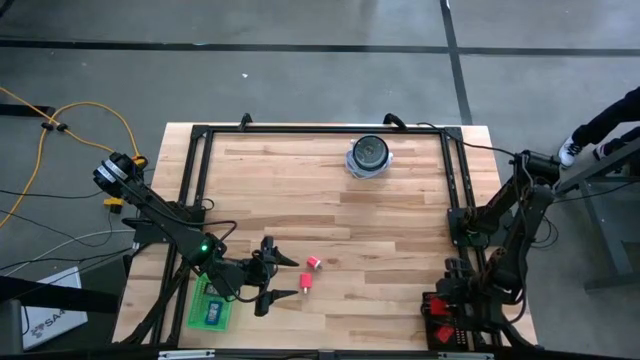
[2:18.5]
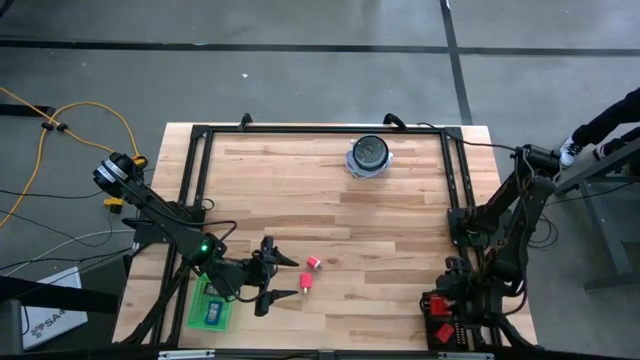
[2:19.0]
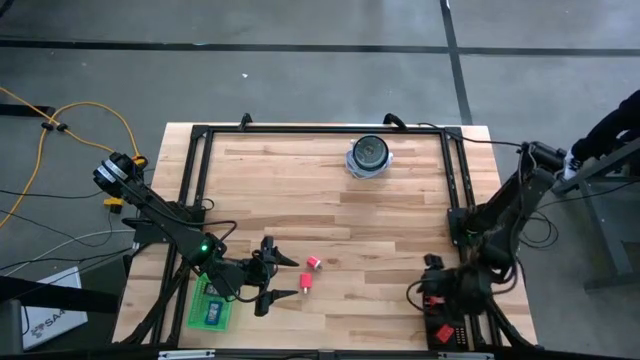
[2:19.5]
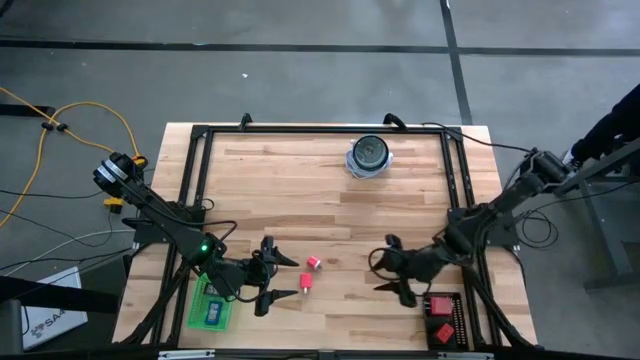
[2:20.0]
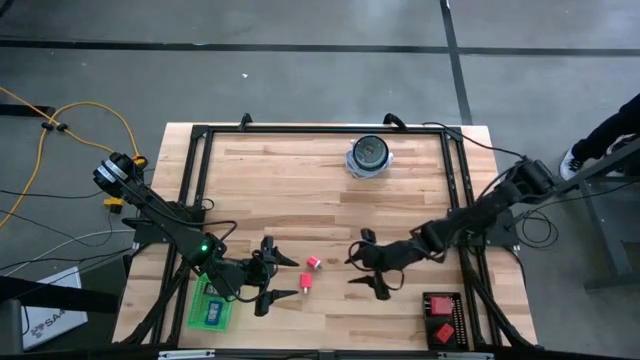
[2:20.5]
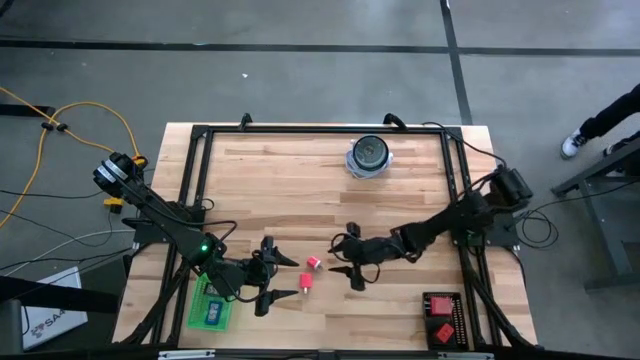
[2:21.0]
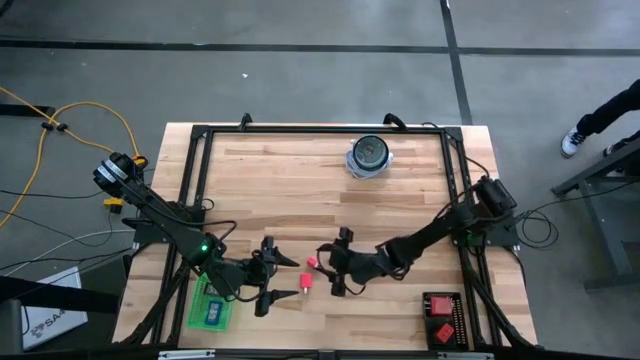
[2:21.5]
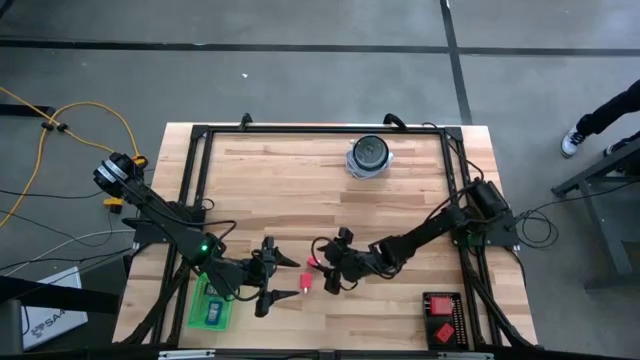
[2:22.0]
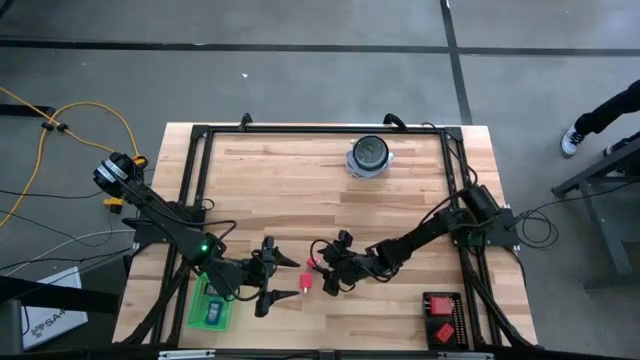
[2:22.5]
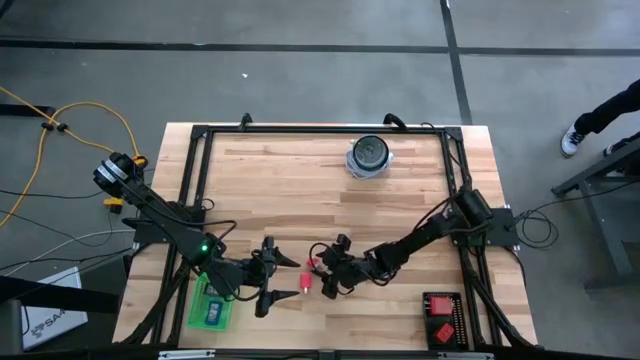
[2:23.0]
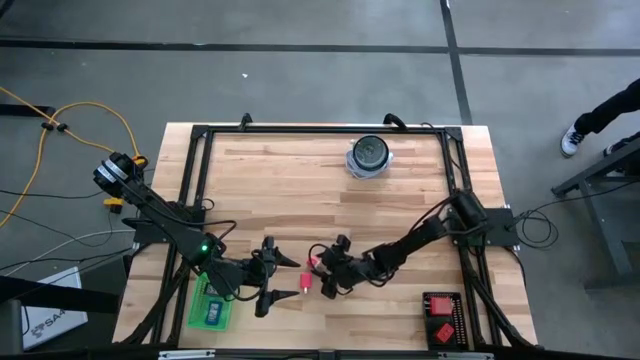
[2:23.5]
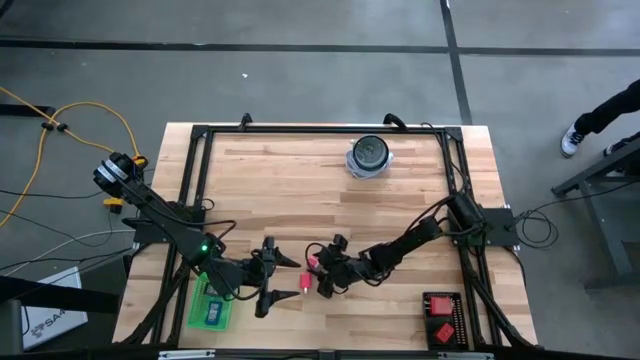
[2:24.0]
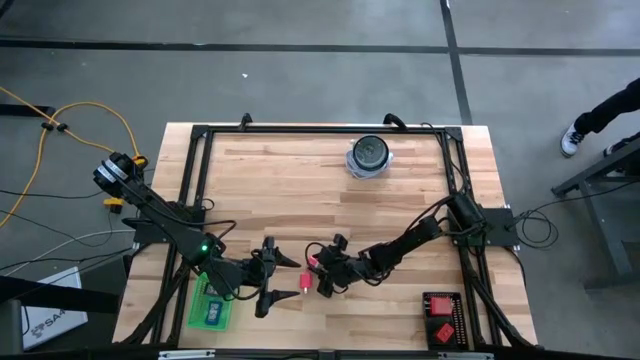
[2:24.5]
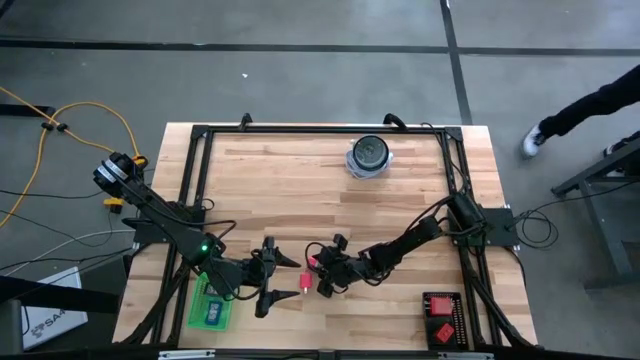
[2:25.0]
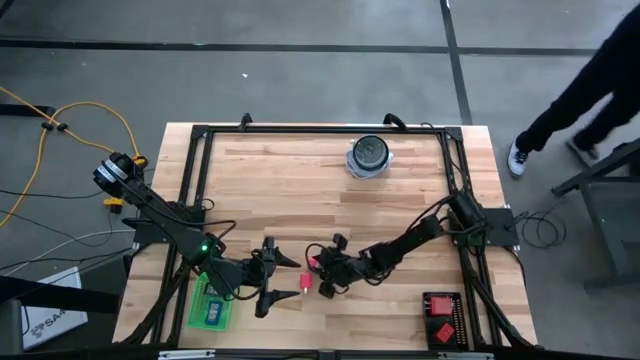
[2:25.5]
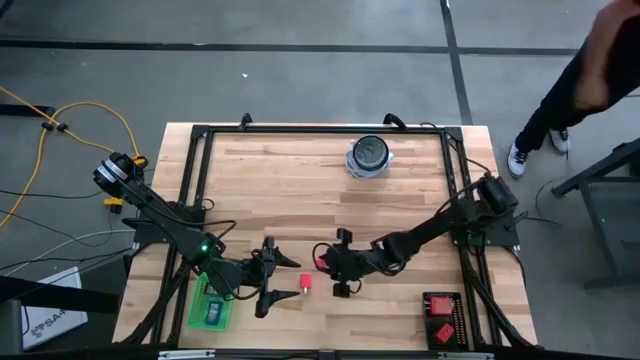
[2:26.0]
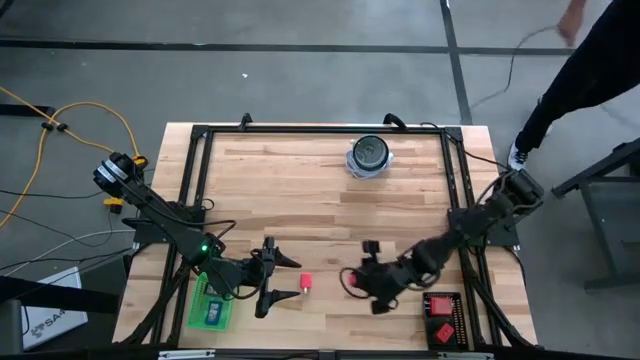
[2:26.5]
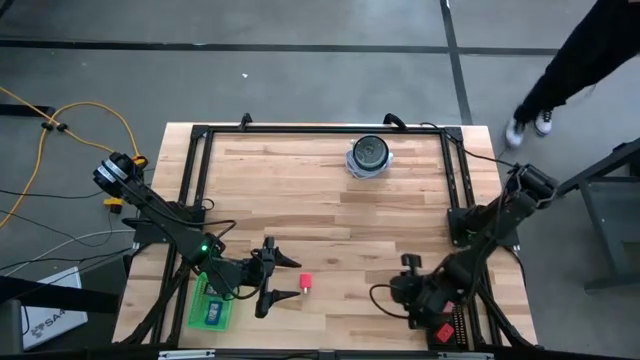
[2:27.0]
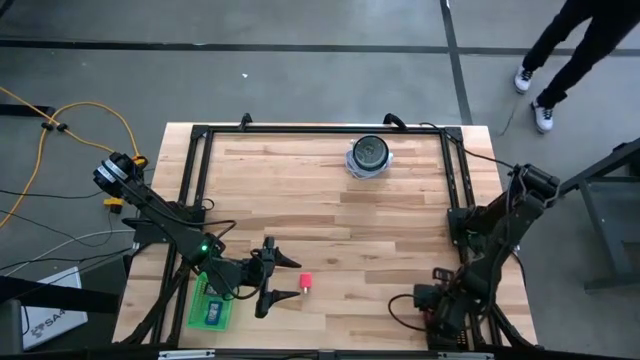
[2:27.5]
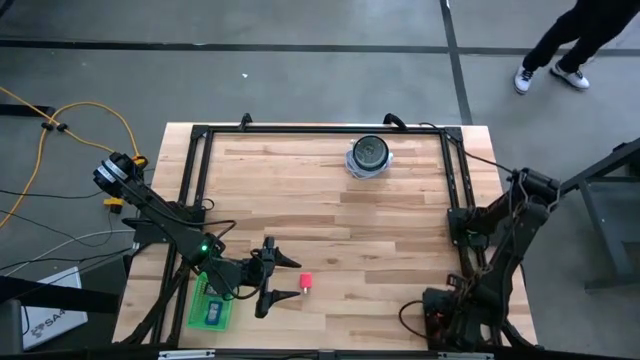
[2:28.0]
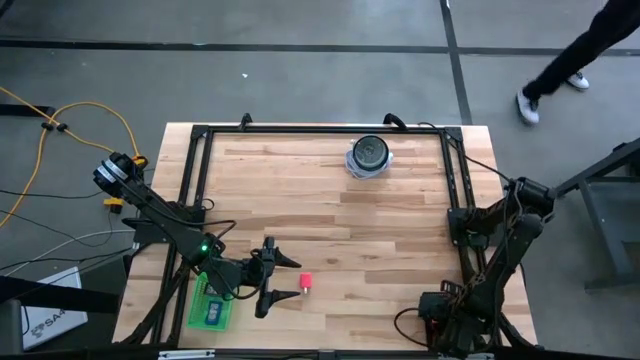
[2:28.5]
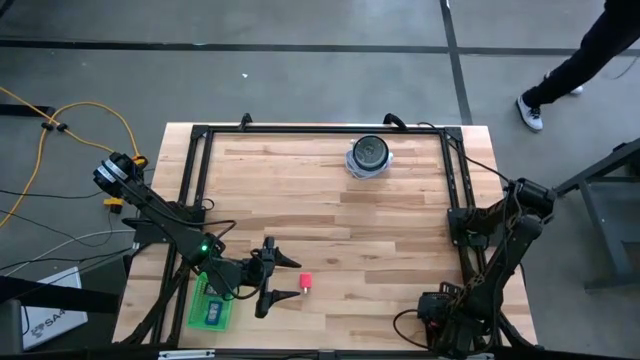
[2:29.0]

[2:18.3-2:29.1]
Task: Pick & Place Office items
Put the top pink charger adapter into the black bin

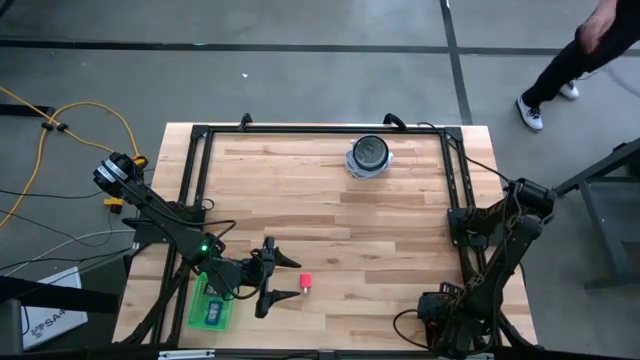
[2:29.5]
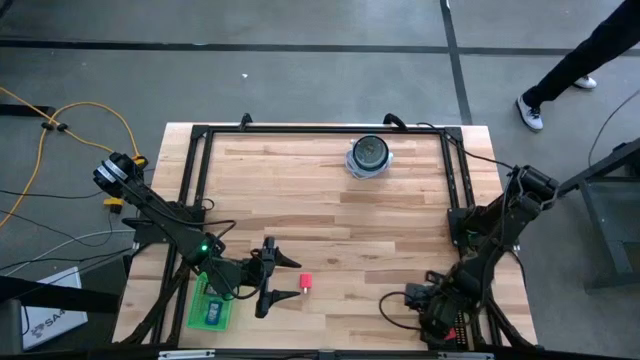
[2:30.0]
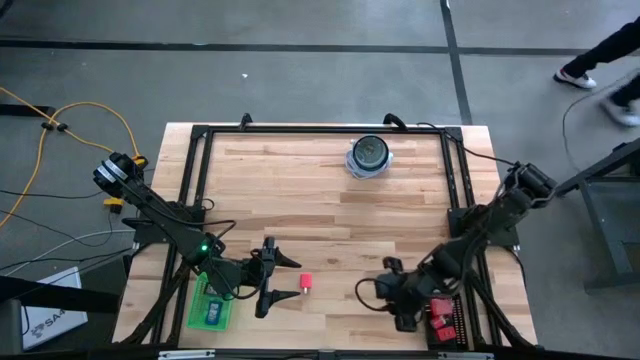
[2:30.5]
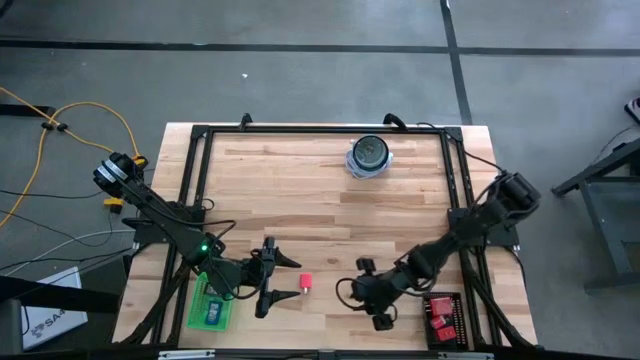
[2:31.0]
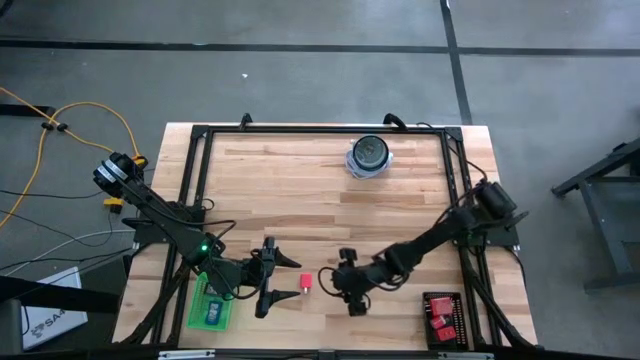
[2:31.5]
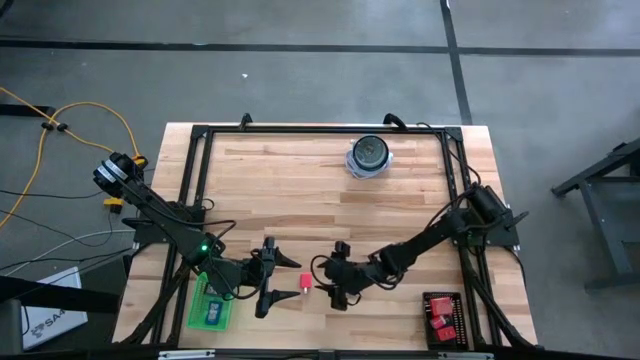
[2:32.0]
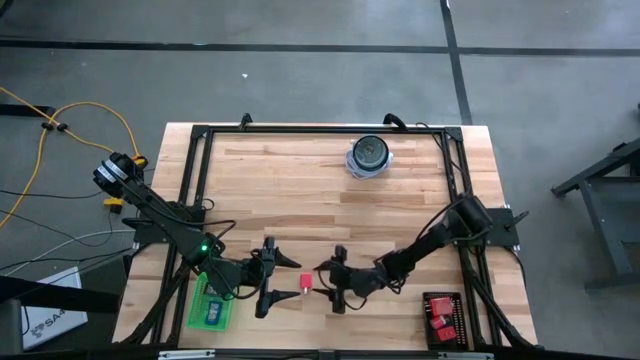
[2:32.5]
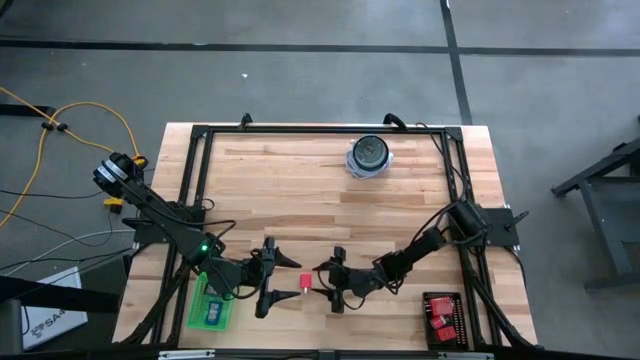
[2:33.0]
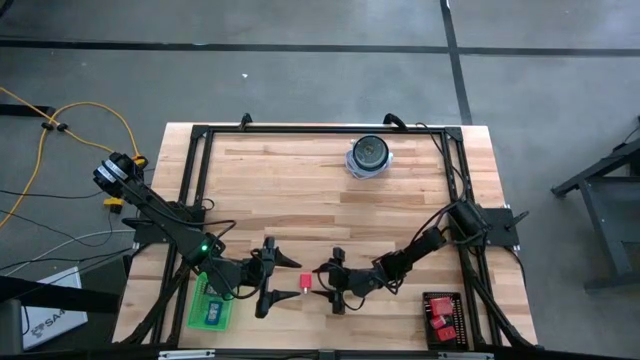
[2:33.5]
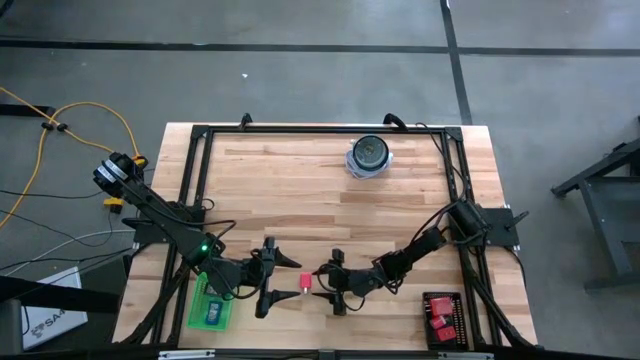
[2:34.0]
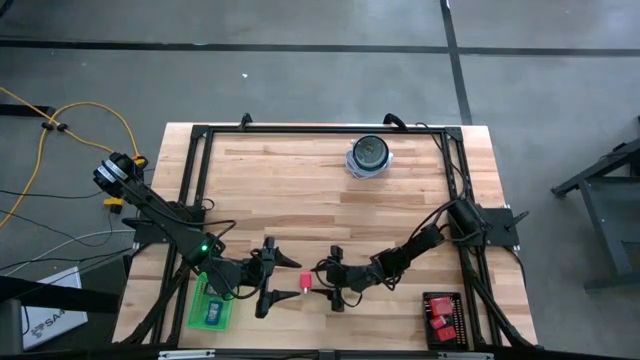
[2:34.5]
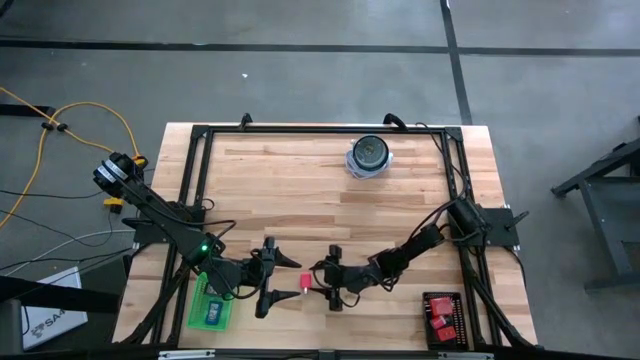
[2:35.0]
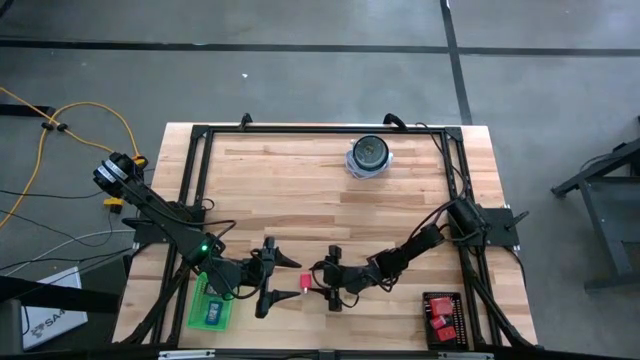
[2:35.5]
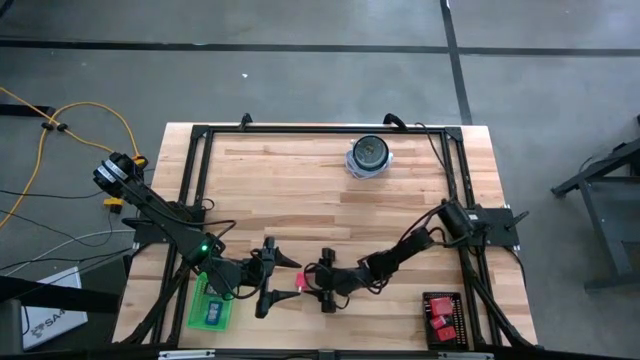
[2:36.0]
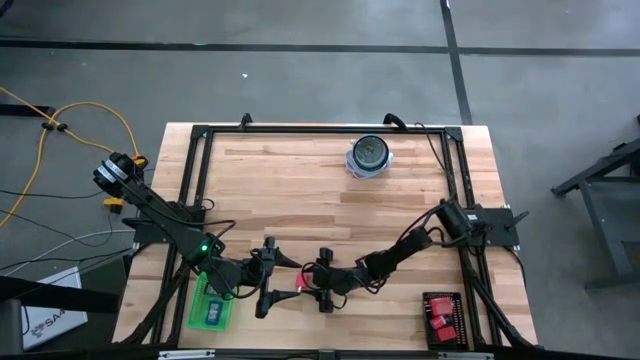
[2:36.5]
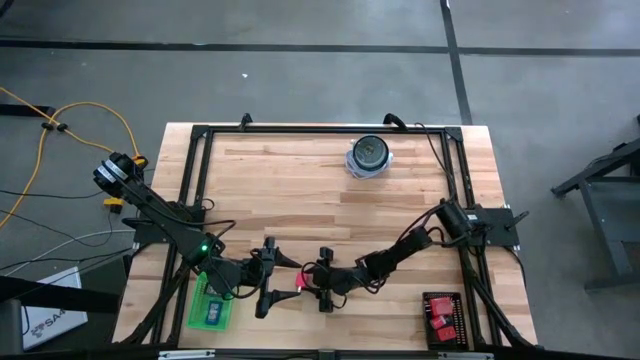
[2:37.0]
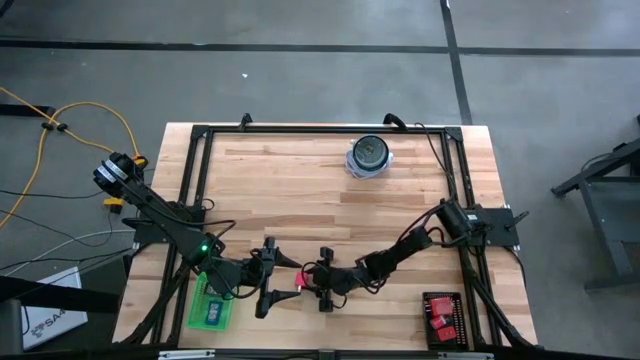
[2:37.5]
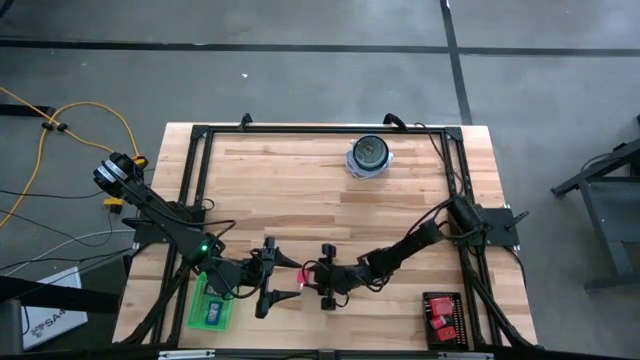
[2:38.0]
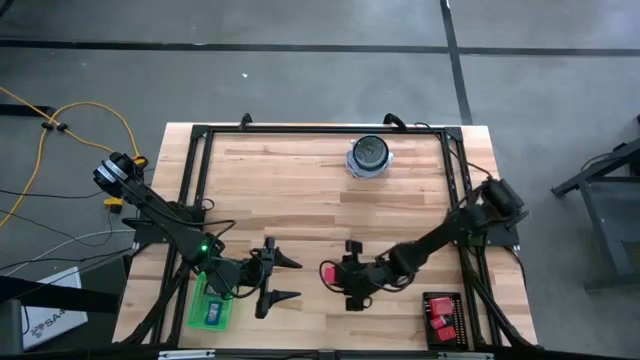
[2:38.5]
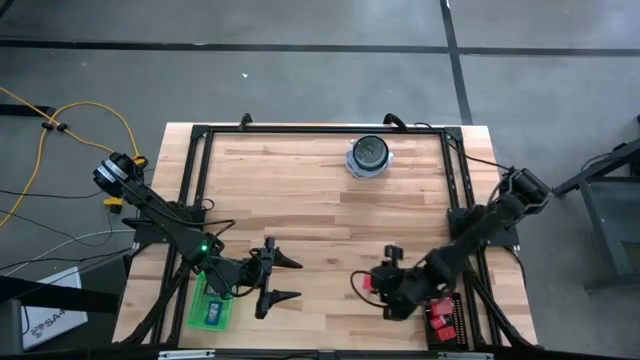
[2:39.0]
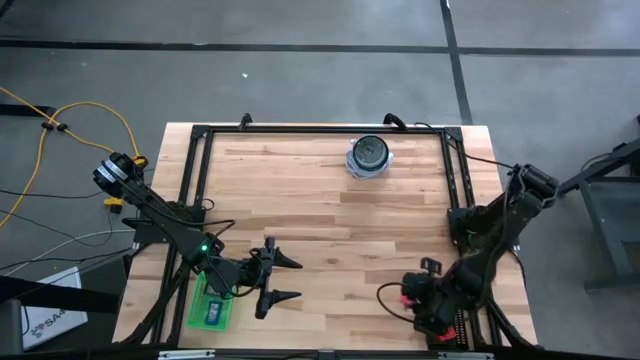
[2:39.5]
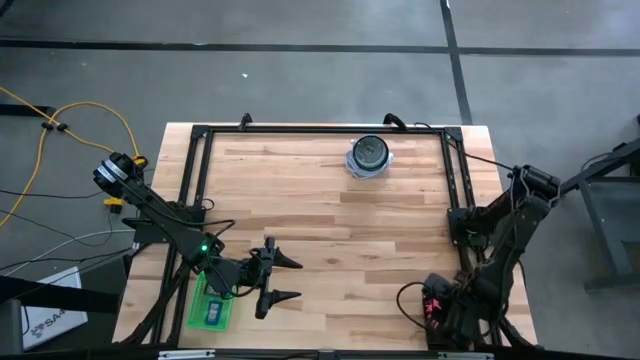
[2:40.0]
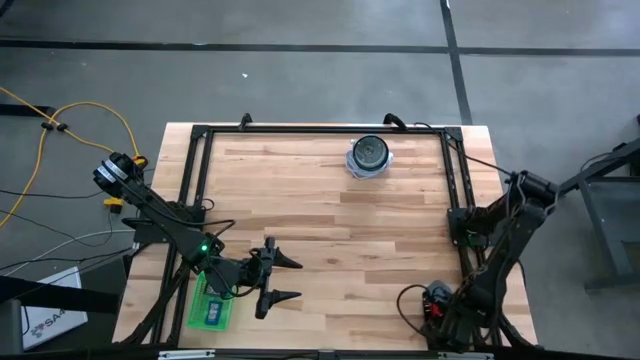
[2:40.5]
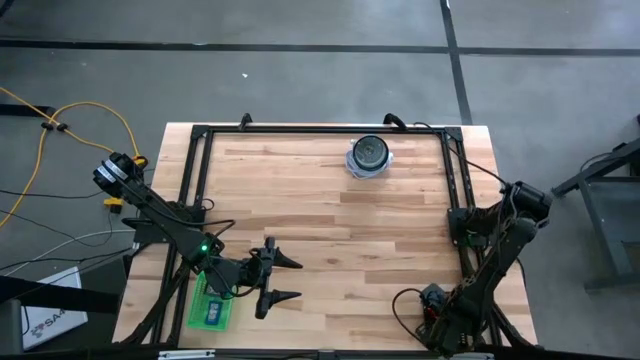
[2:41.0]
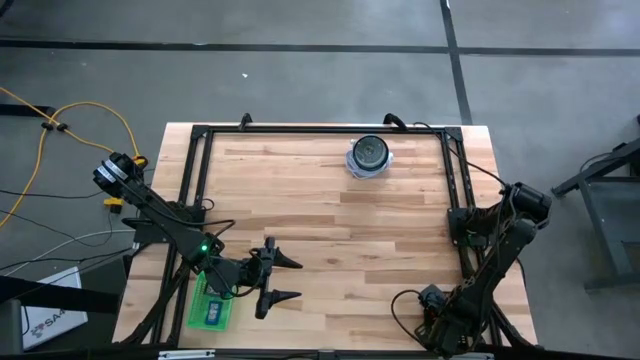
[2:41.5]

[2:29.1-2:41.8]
Put the pink charger adapter into the black bin
